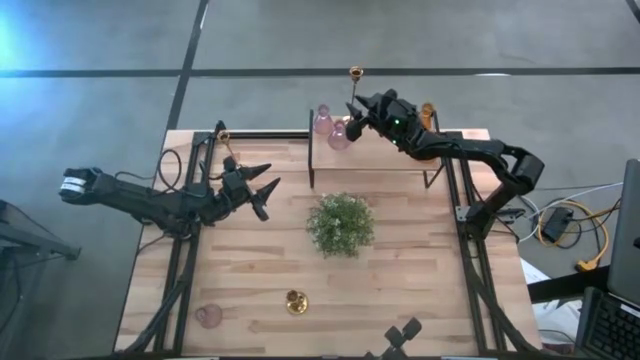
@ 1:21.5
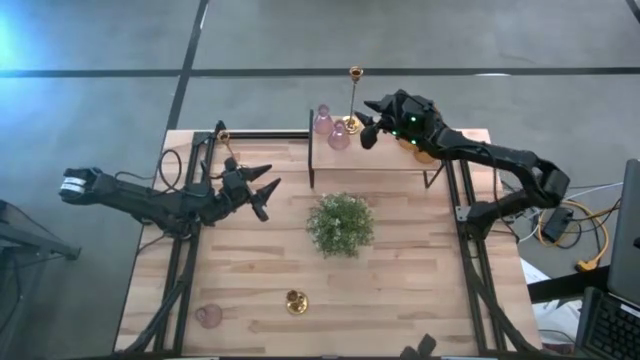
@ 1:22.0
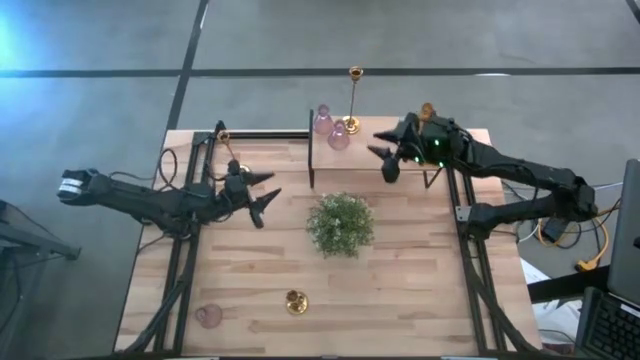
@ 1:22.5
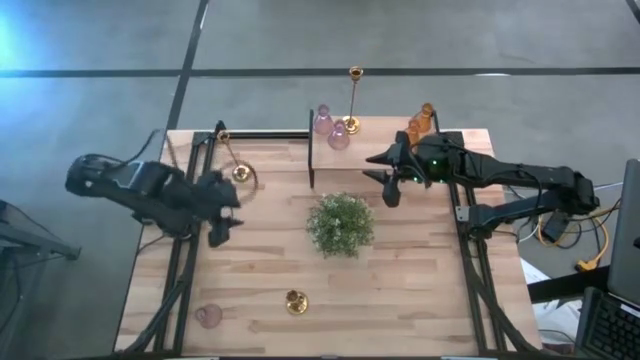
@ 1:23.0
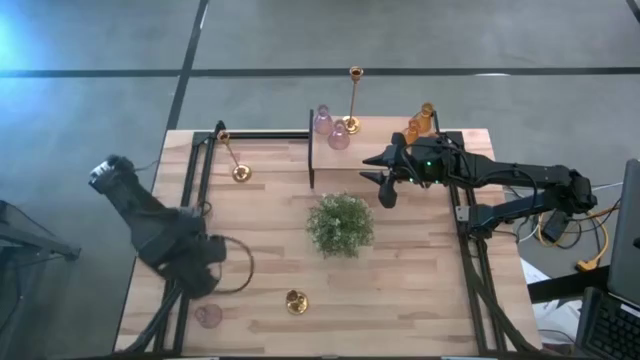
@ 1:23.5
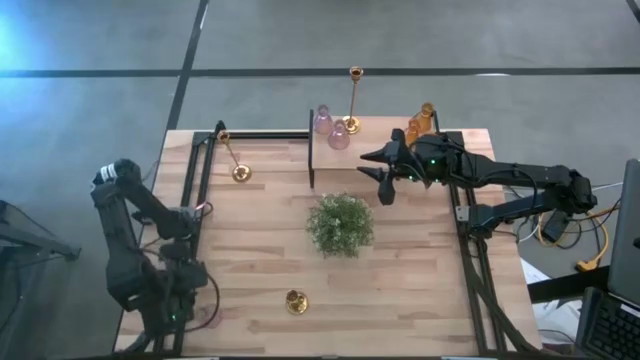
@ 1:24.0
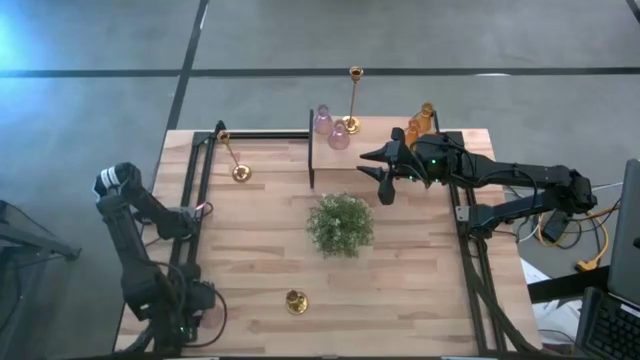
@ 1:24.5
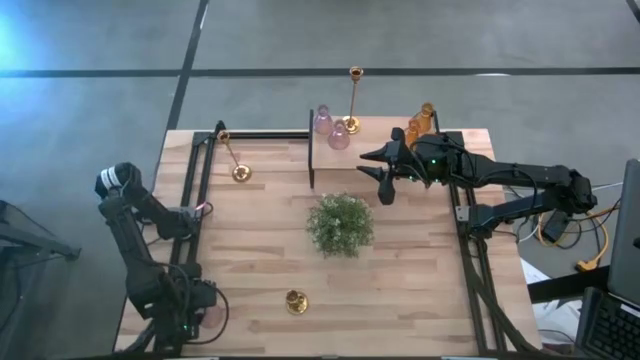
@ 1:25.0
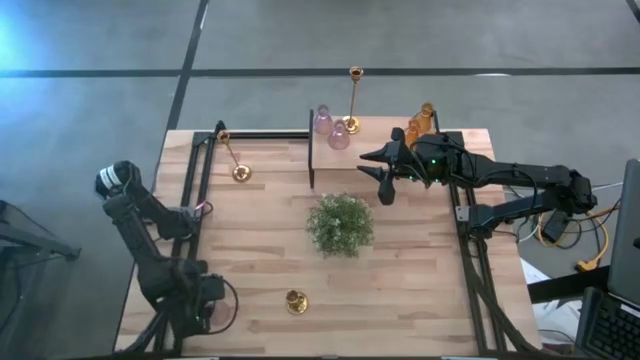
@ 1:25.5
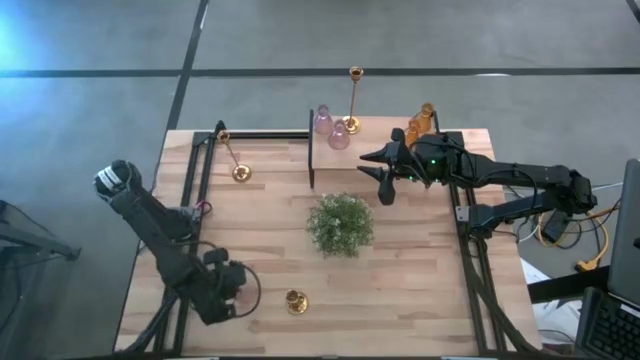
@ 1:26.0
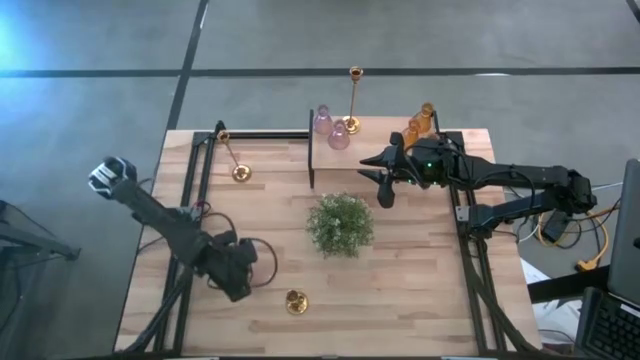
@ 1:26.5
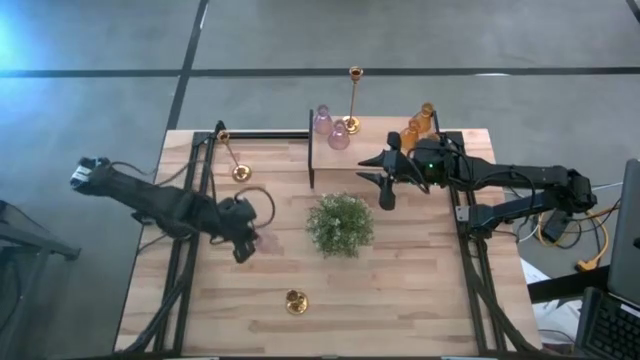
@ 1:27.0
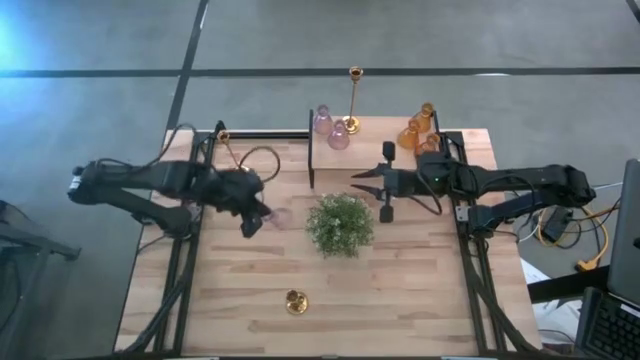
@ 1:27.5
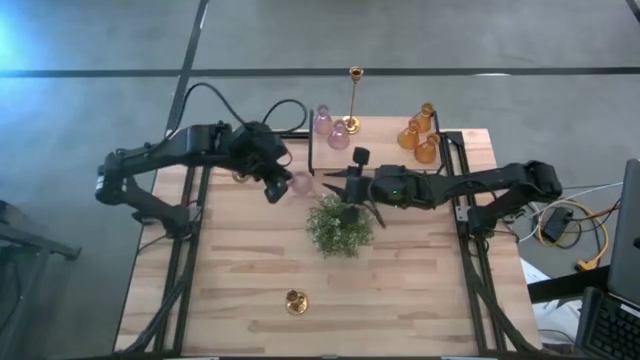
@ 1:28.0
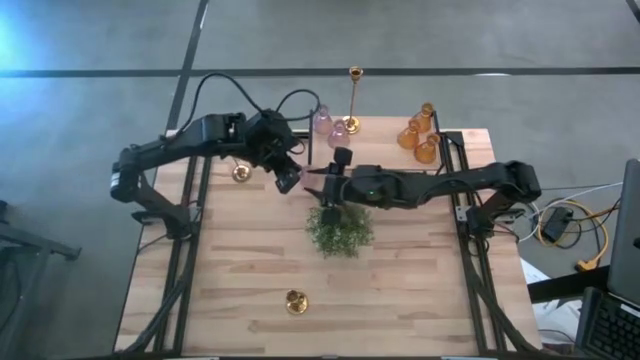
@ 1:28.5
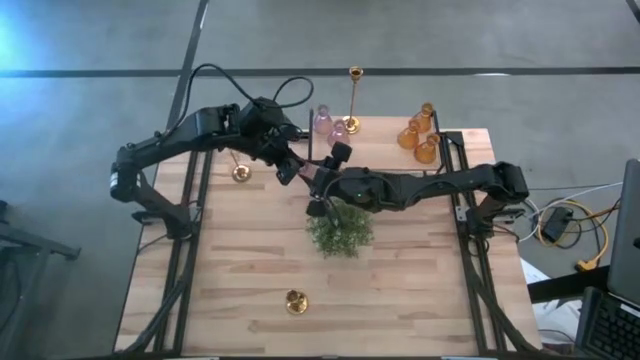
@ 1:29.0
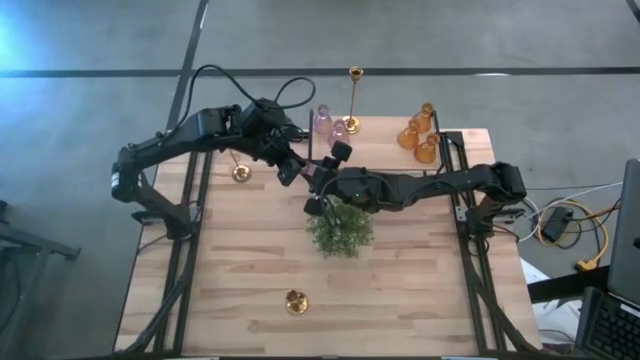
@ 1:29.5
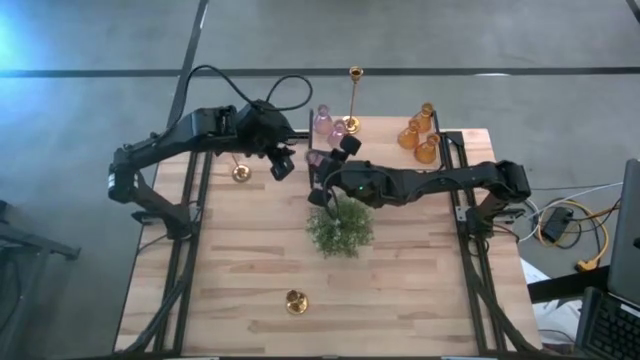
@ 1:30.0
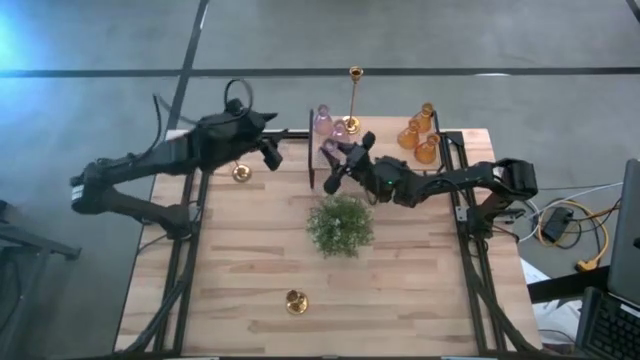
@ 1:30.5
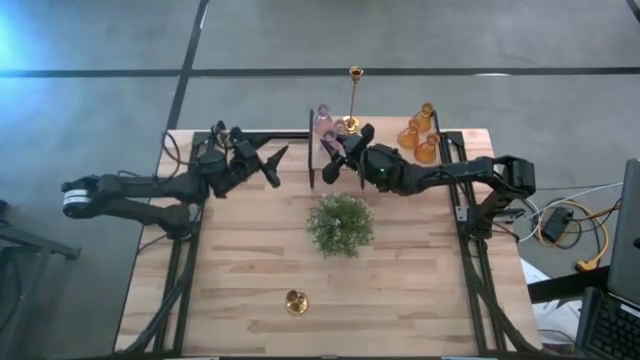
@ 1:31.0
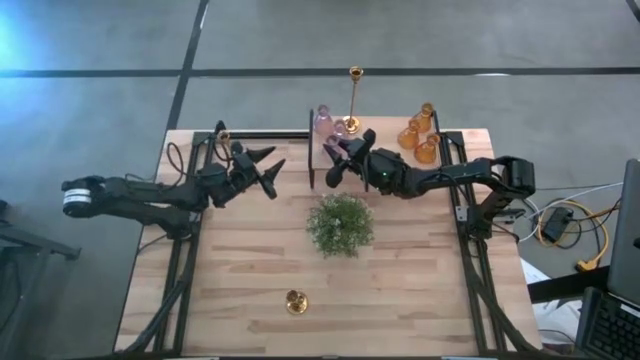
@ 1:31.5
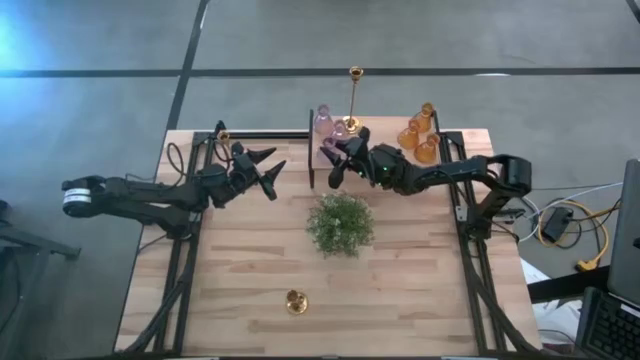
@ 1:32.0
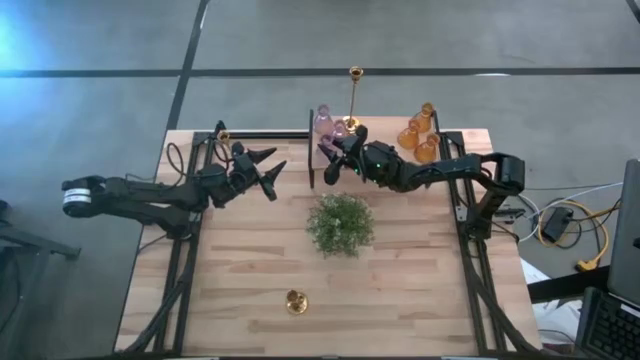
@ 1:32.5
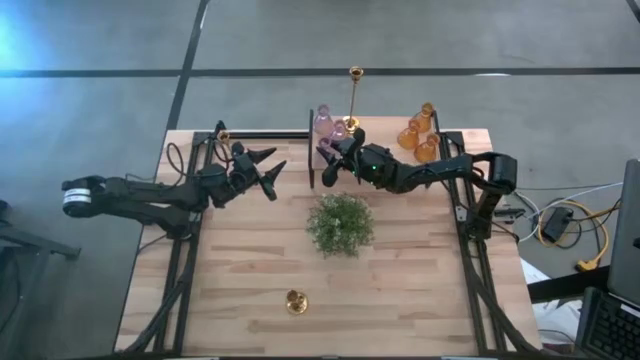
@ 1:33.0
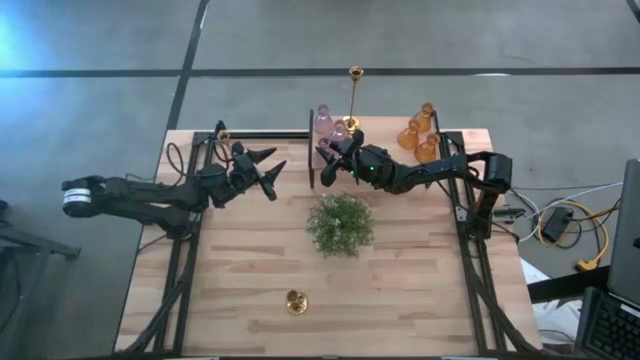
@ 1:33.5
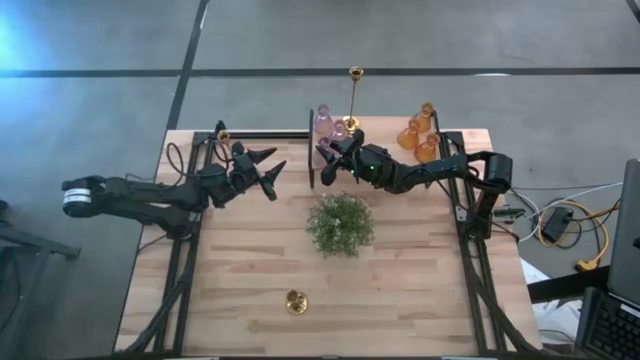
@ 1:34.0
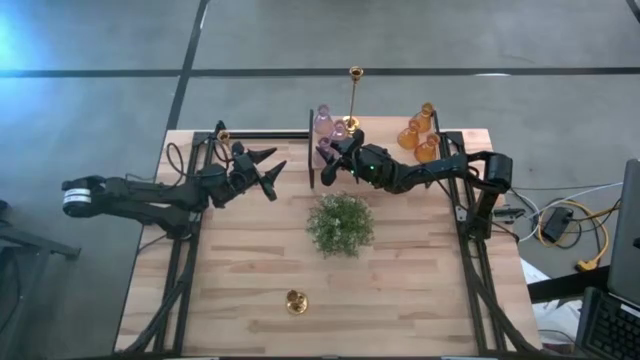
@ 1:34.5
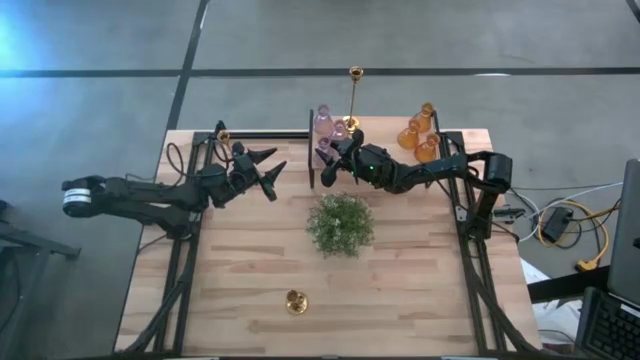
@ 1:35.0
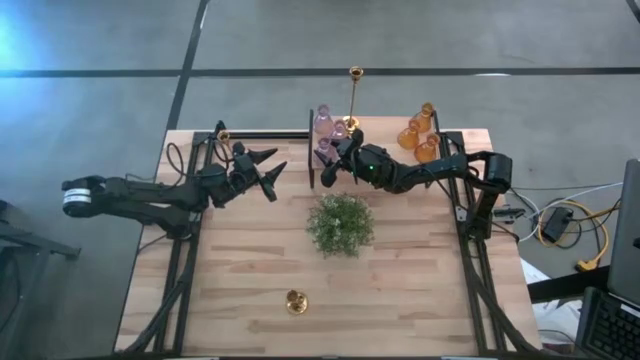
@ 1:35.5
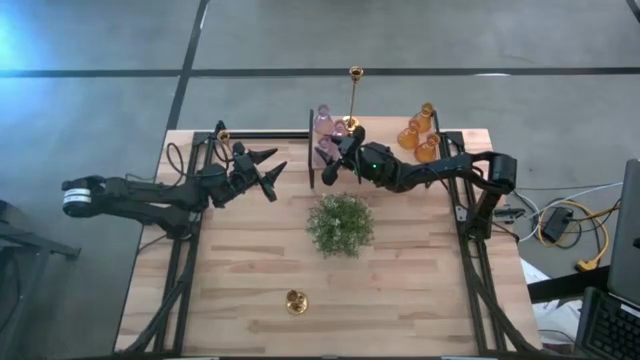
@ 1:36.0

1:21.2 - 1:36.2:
Task: Pick & Place candle stick holders
Put the pink candle holder on the shelf

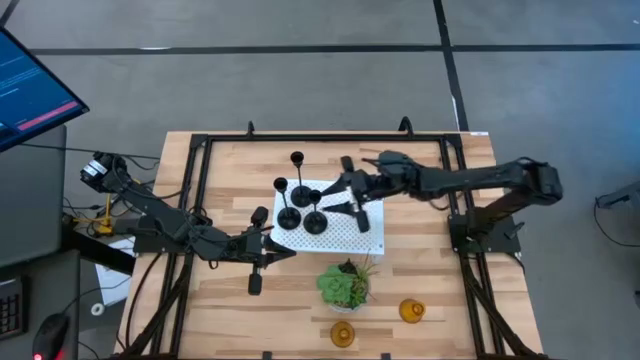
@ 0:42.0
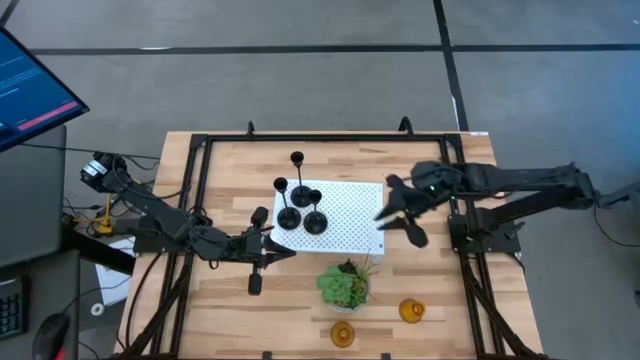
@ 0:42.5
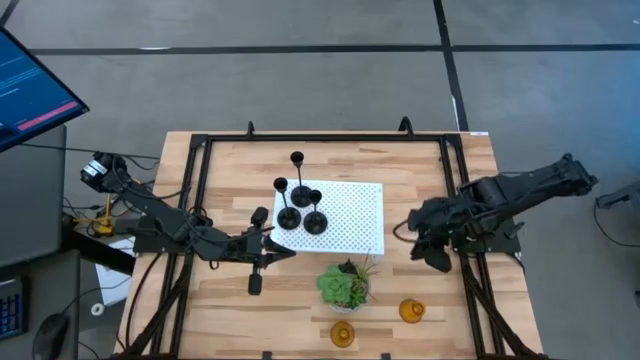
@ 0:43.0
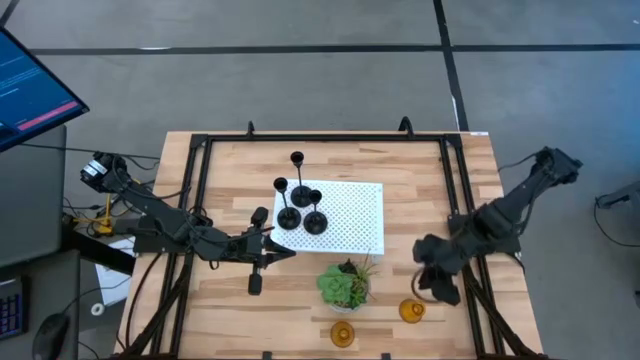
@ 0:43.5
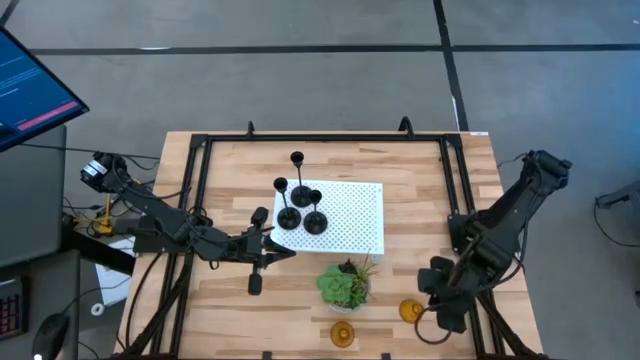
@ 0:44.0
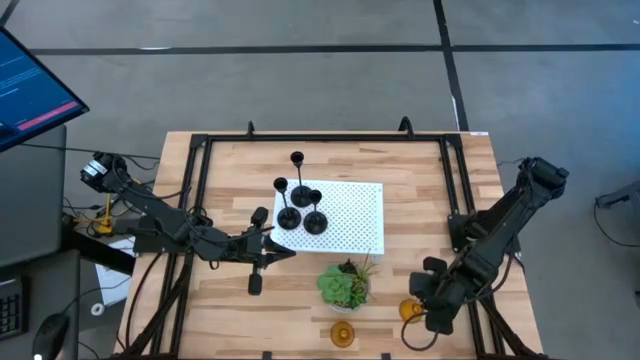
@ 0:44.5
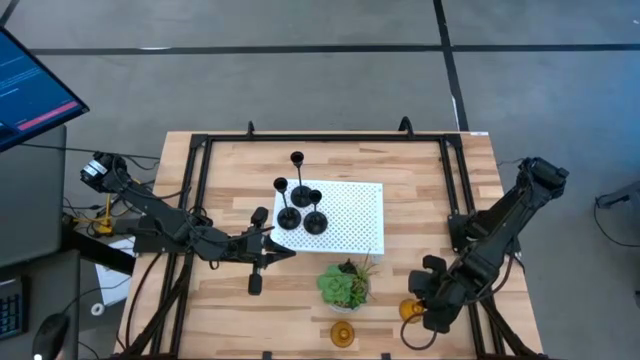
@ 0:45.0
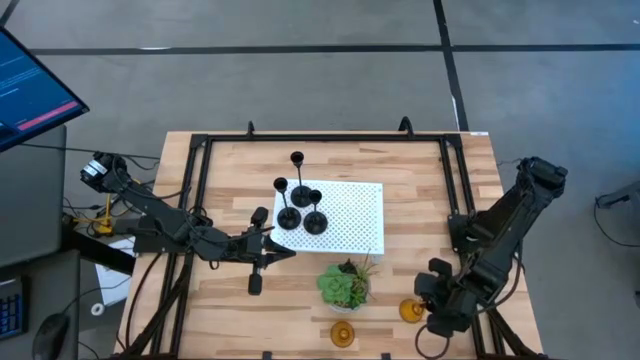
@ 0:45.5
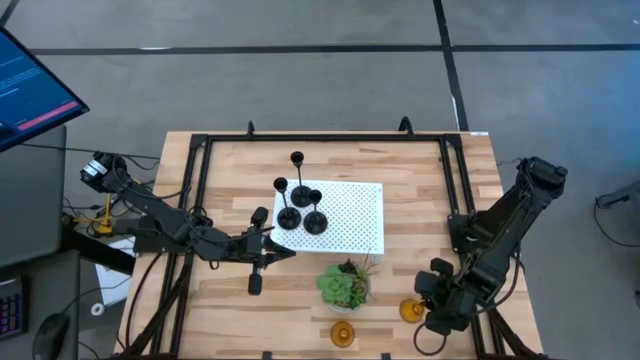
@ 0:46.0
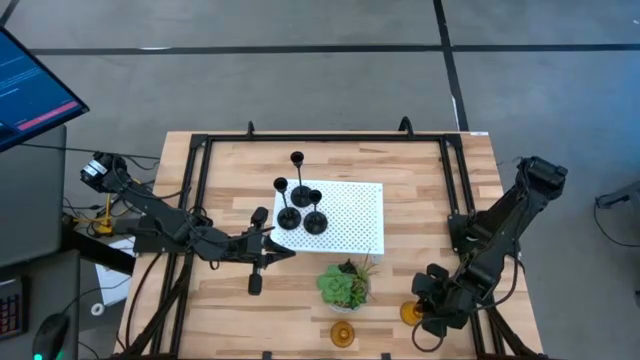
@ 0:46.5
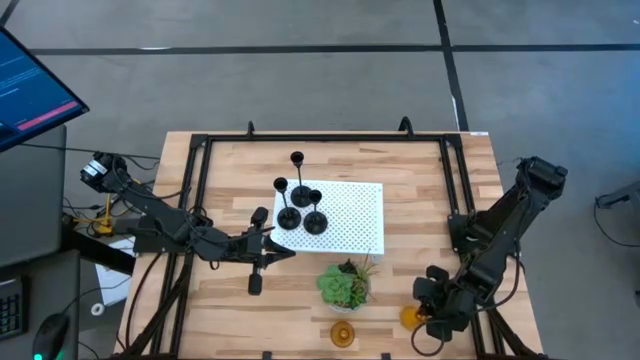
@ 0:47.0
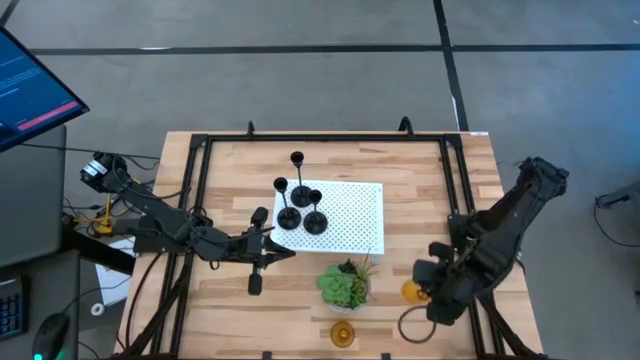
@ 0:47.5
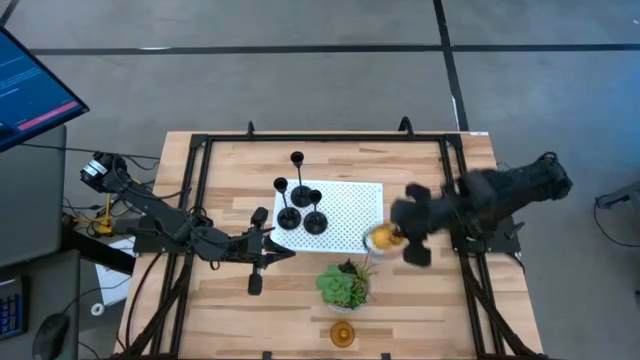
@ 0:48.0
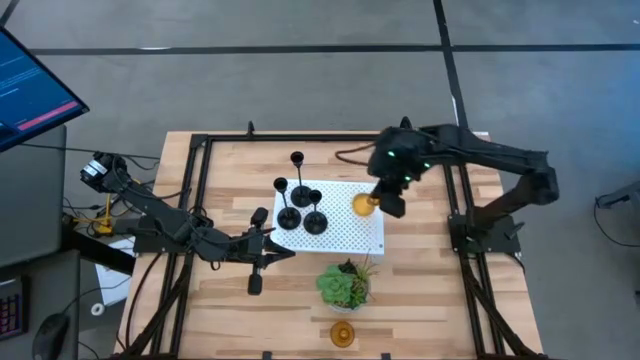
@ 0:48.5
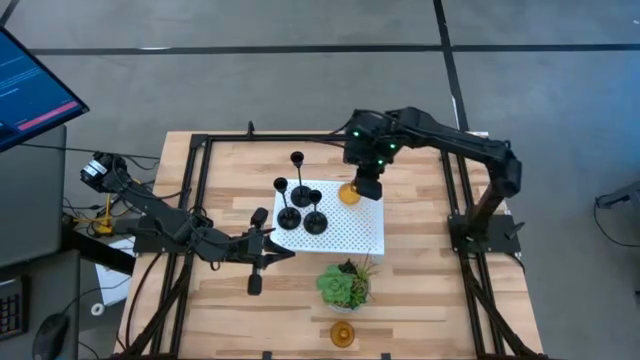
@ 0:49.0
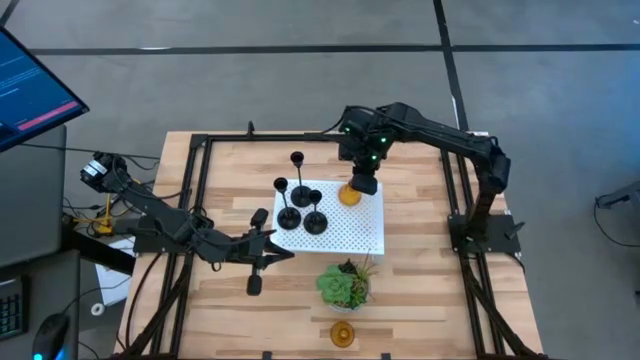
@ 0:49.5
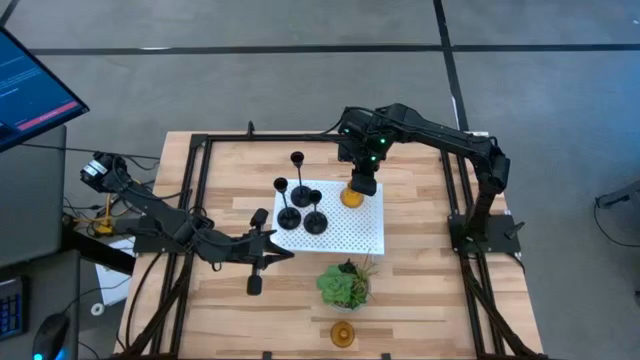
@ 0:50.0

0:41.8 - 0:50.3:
Task: Pick & Place candle stick holders
Put the top orange transparent candle holder on the shelf
